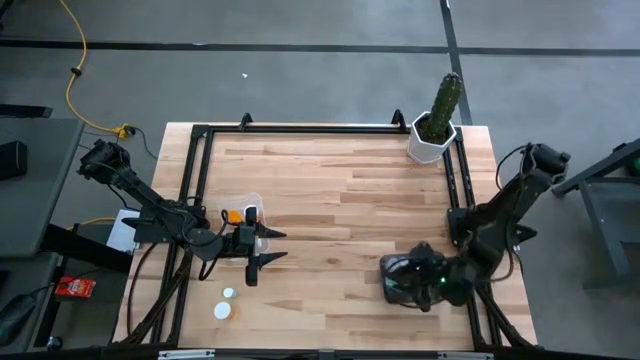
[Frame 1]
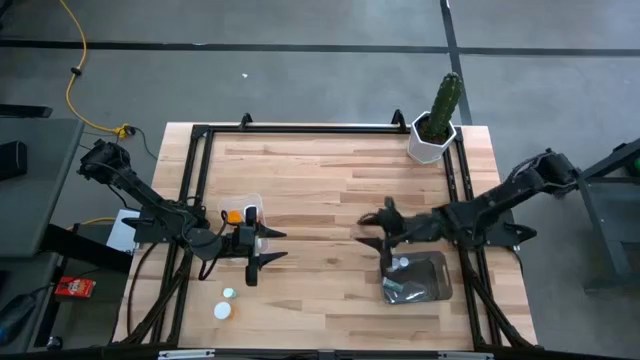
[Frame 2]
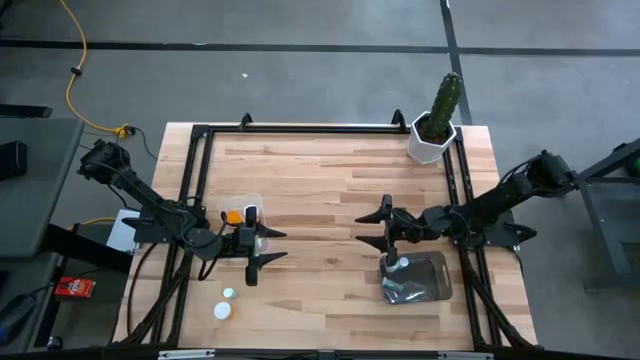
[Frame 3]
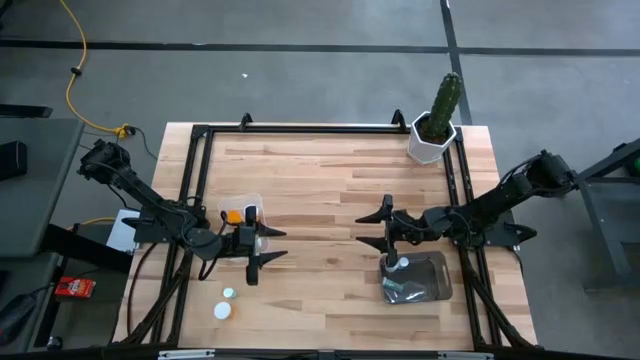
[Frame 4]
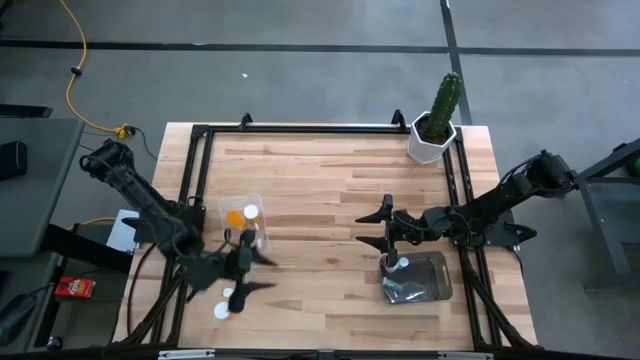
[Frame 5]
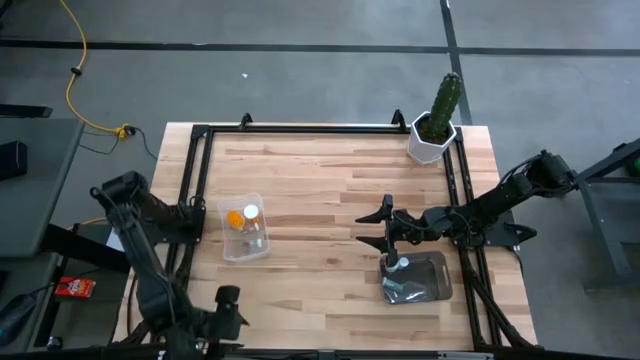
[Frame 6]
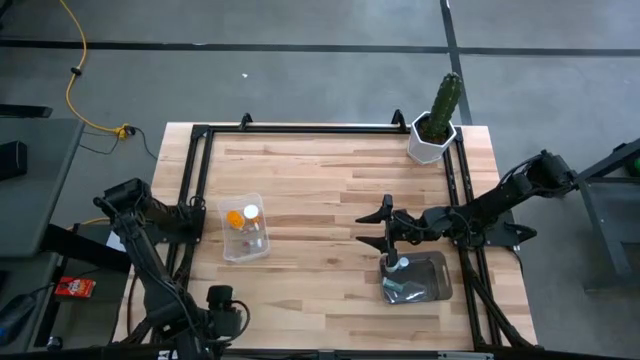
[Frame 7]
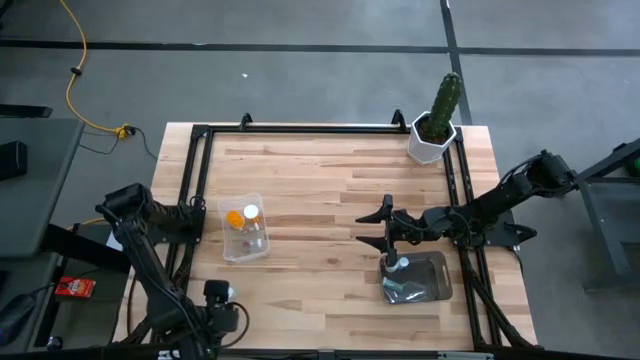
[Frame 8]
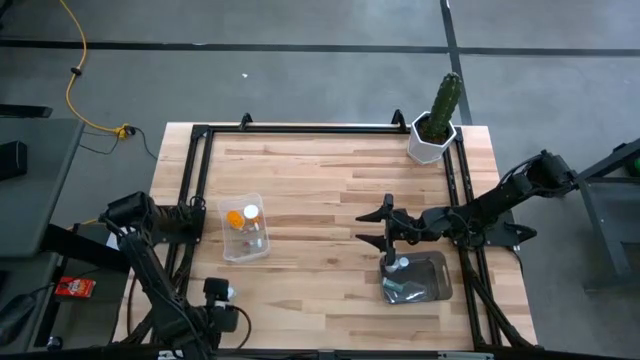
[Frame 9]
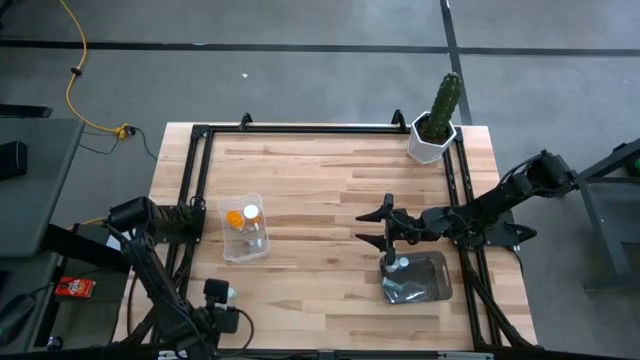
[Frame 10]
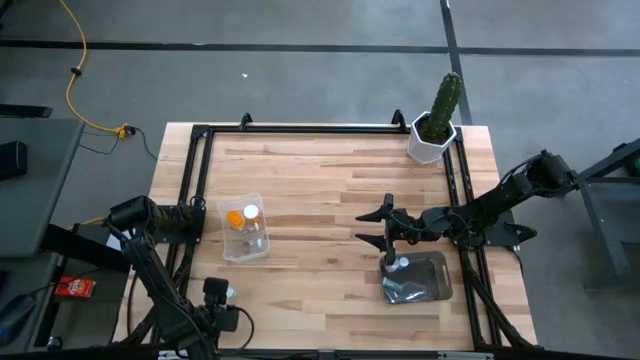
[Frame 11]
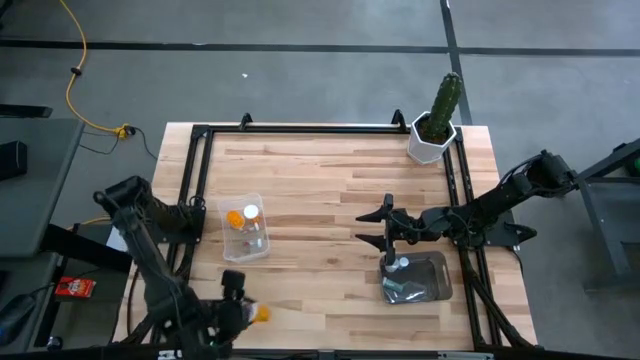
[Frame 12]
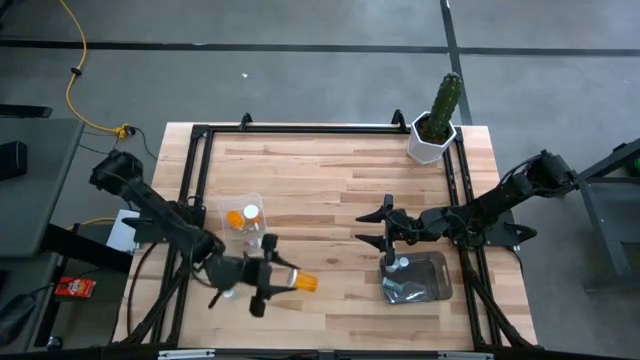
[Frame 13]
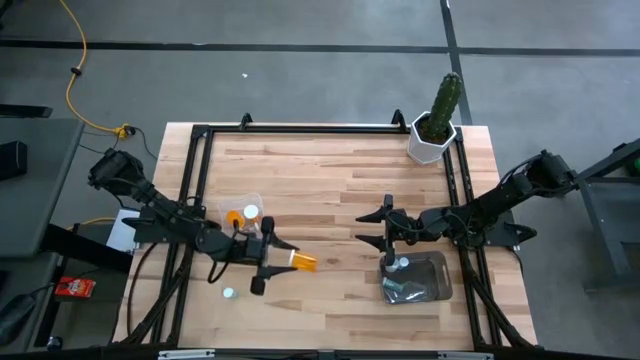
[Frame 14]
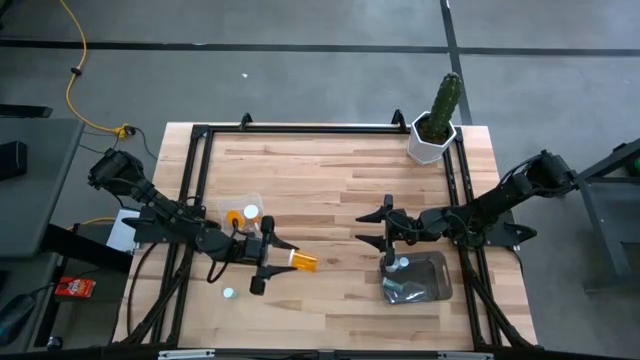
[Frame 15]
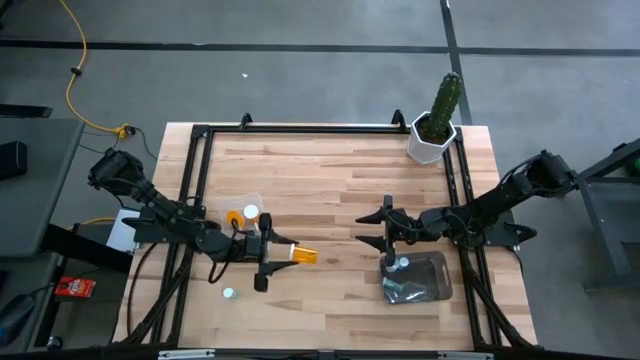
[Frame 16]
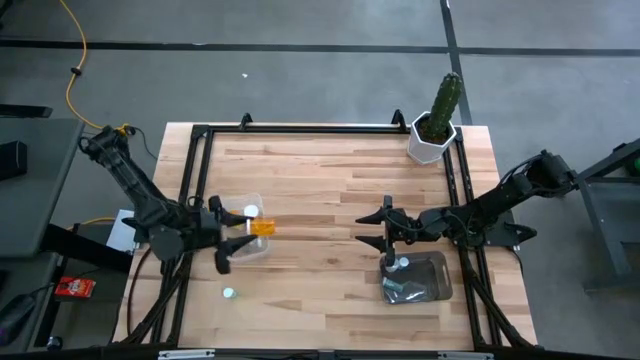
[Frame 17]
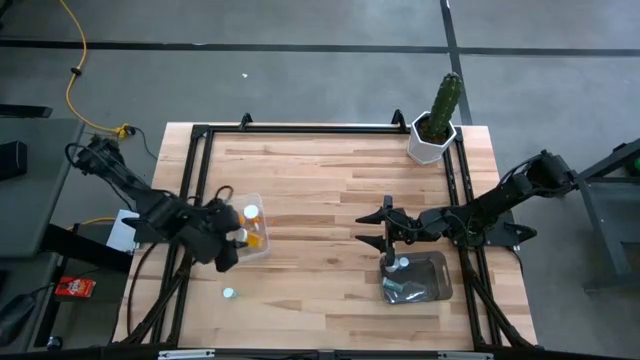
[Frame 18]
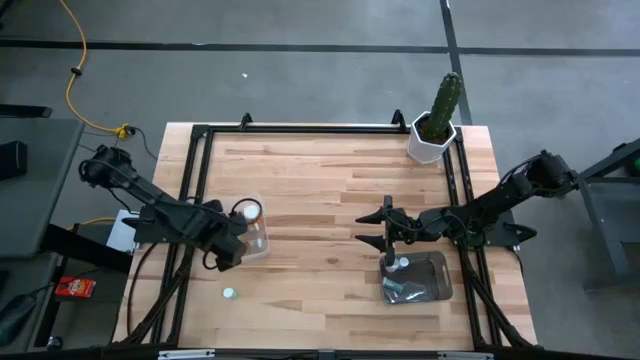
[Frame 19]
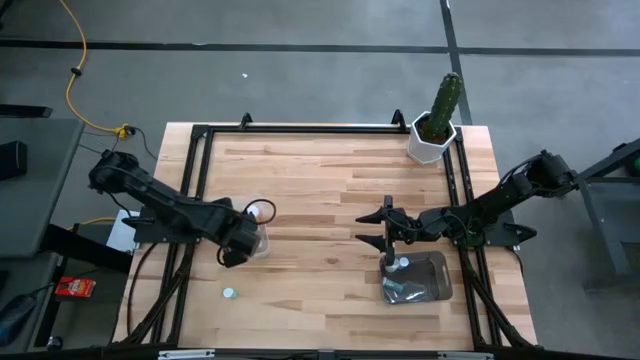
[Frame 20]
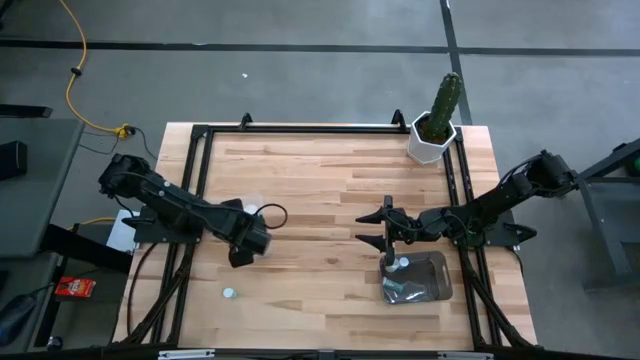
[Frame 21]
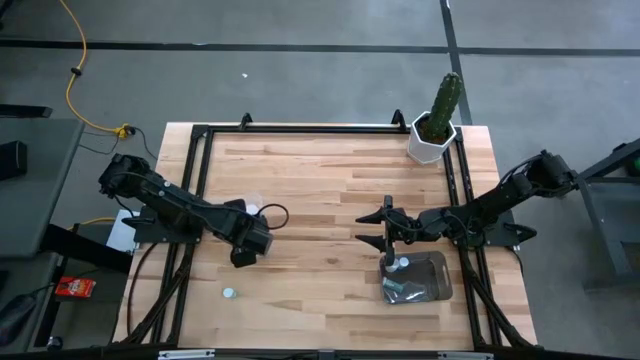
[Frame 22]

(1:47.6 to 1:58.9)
Task: Pick and place medicine bottles into bin by pill shape (circle, oval)
Put the orange capsule bottle into the transparent bin

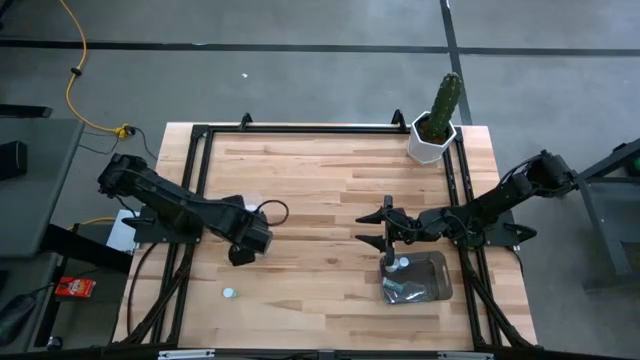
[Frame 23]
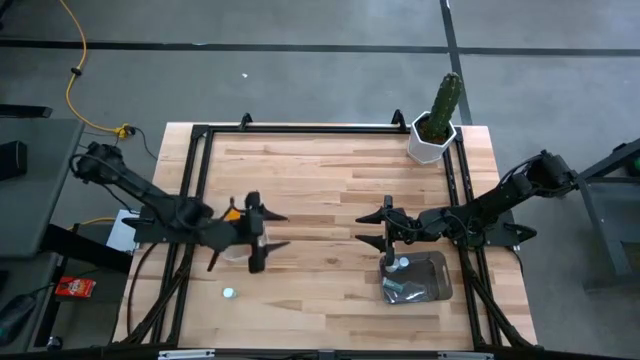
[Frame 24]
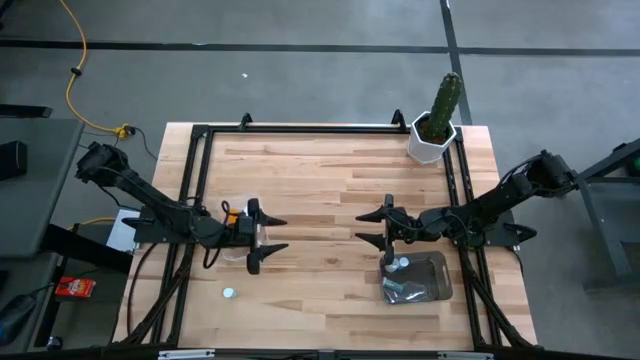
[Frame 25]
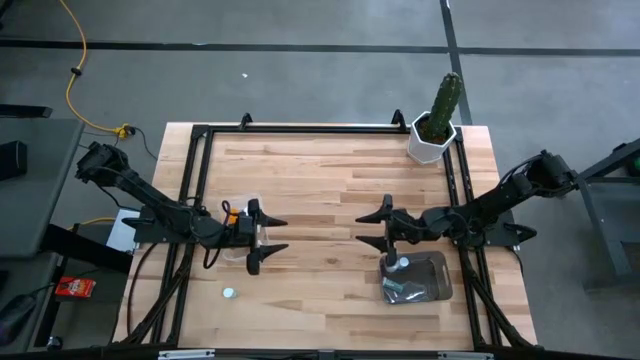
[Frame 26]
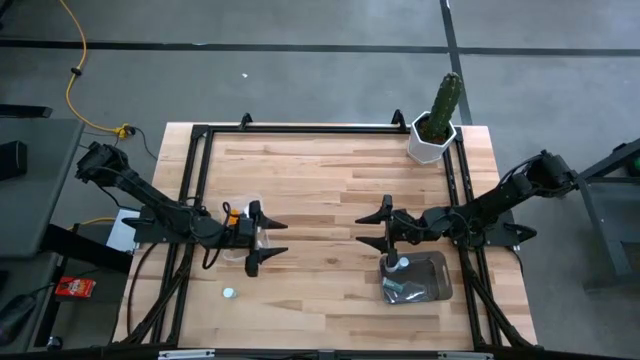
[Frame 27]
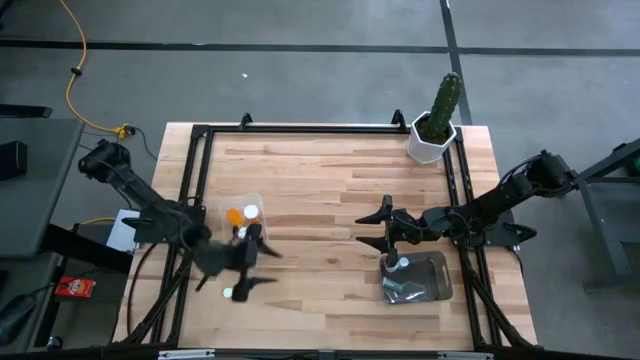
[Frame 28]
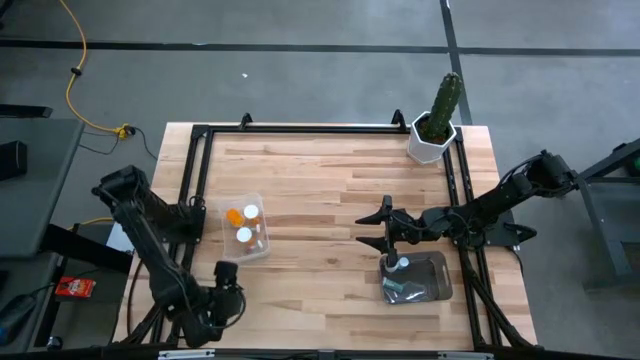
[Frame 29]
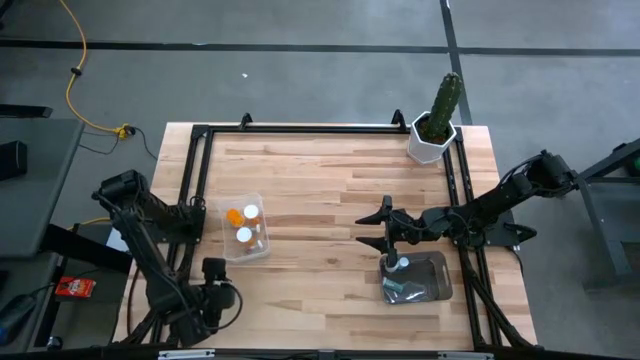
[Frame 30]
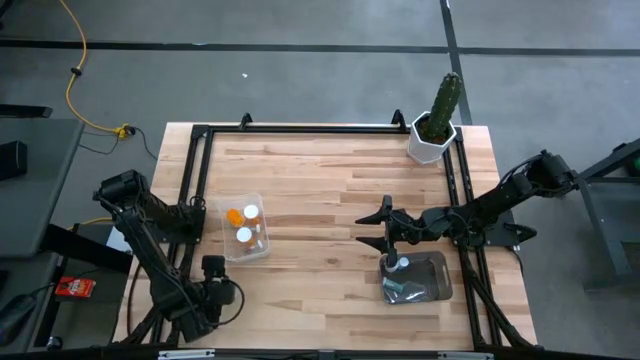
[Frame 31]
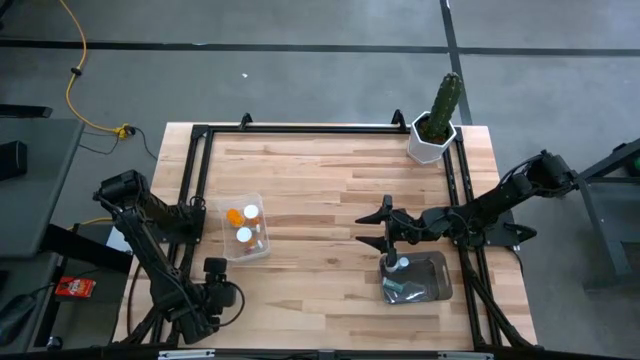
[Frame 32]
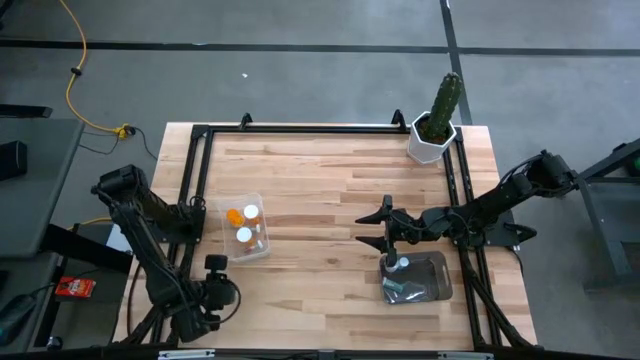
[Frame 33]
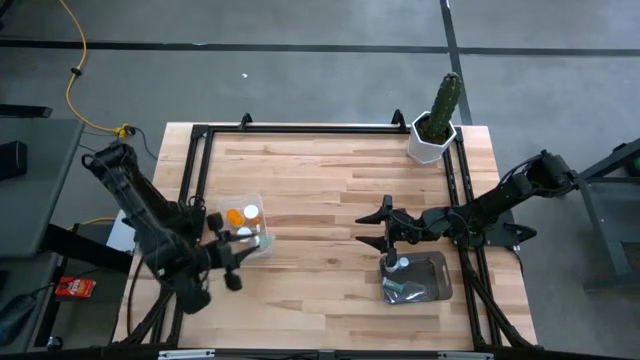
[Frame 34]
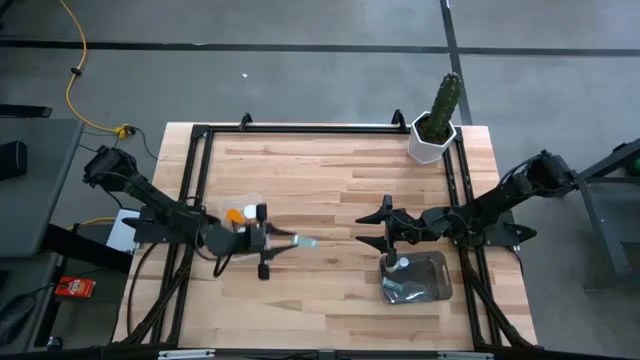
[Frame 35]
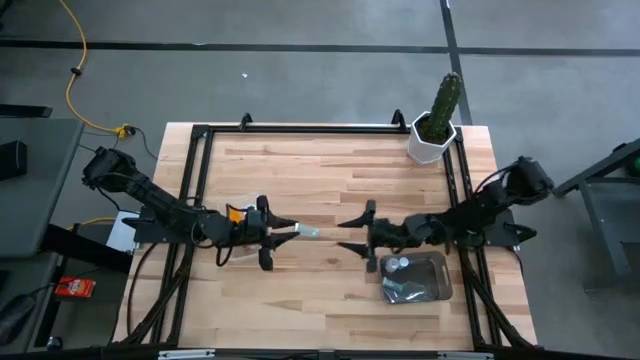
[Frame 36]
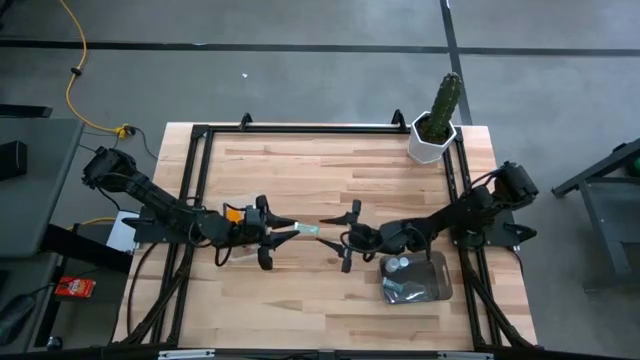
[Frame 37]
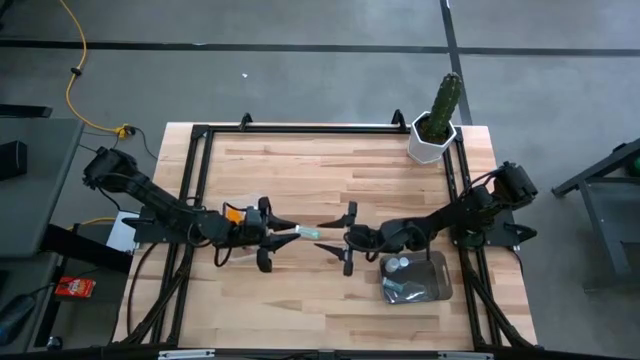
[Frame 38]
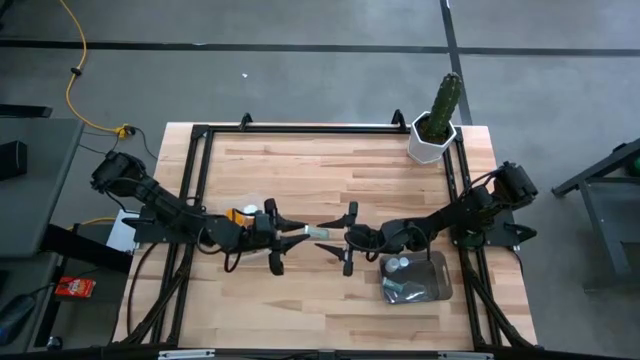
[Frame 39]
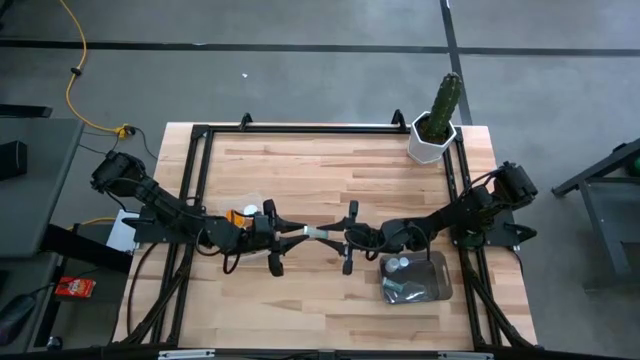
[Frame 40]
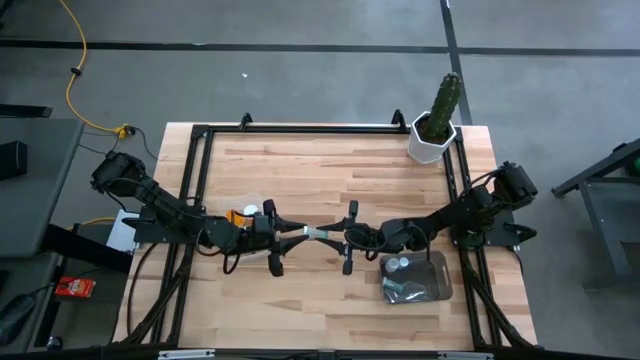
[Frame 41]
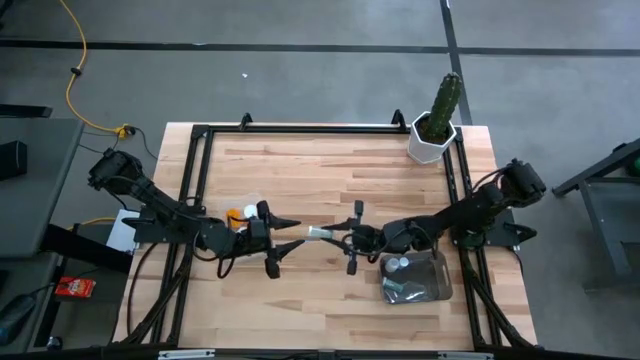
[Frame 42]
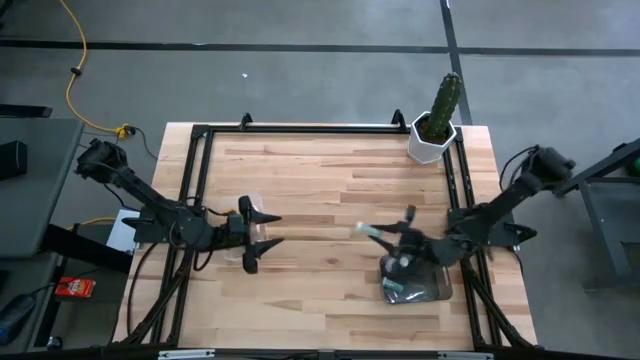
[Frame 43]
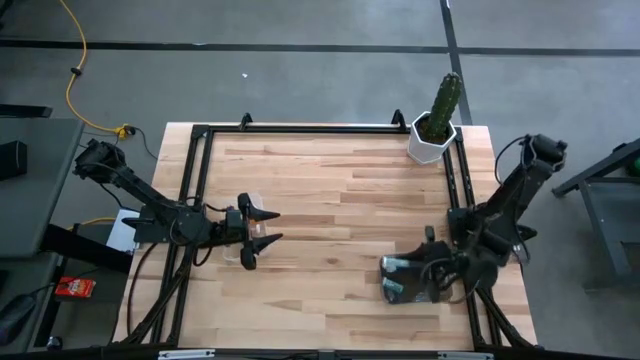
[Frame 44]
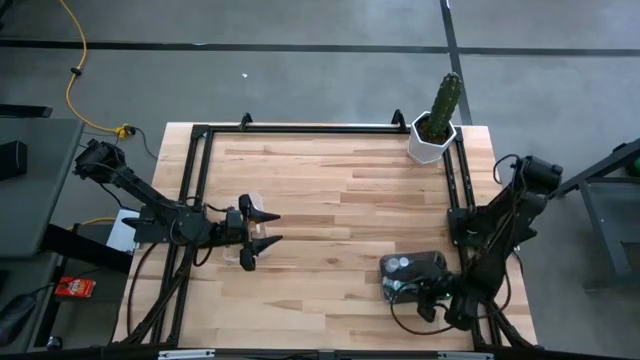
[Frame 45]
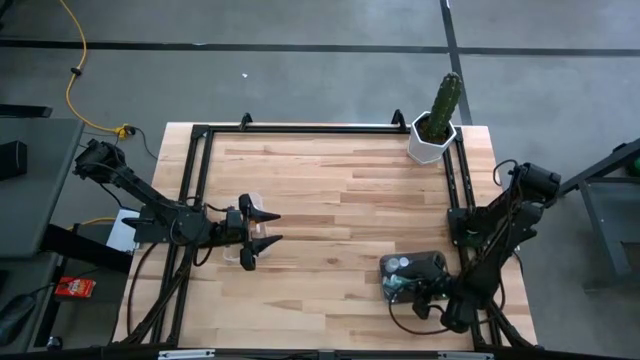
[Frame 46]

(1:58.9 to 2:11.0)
Put the blue tablet bottle into the black bin
